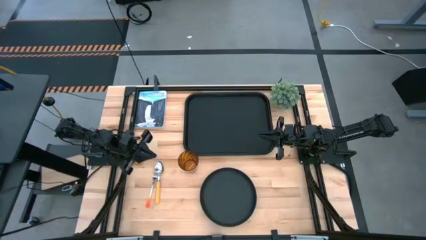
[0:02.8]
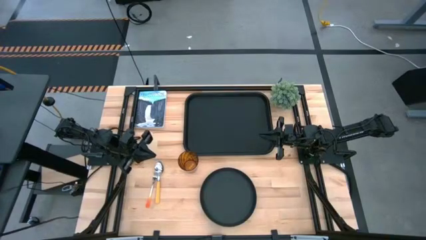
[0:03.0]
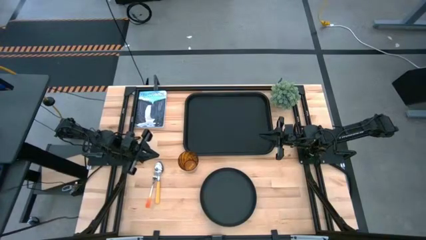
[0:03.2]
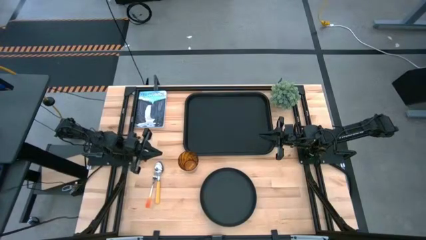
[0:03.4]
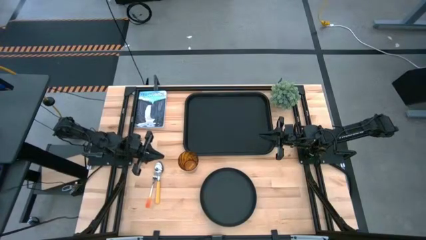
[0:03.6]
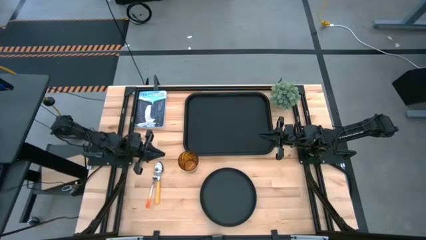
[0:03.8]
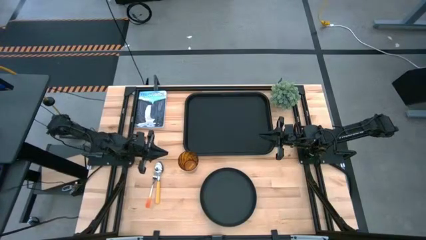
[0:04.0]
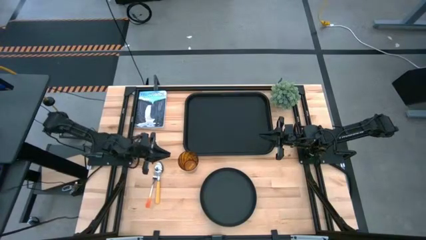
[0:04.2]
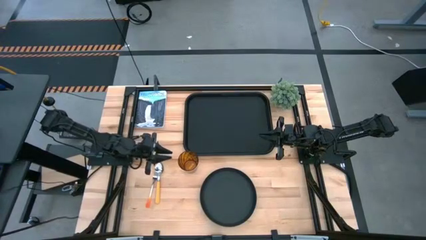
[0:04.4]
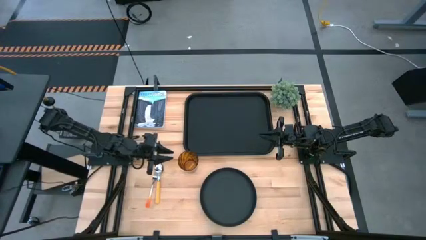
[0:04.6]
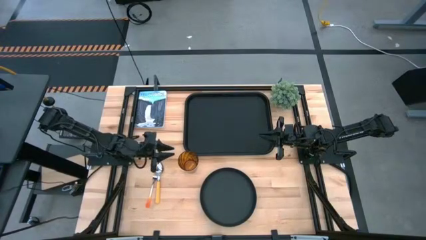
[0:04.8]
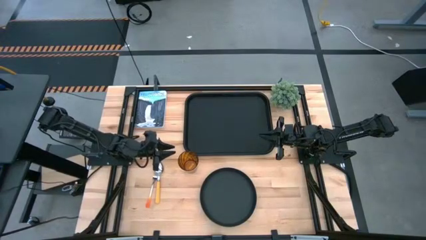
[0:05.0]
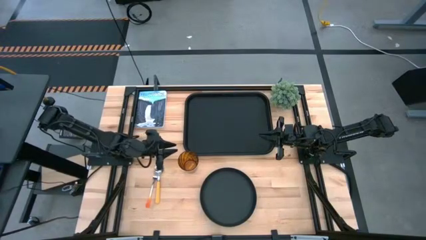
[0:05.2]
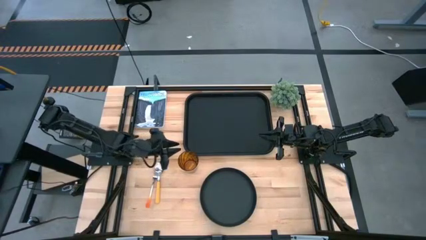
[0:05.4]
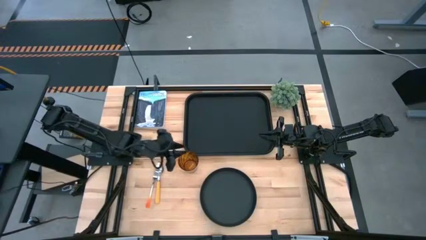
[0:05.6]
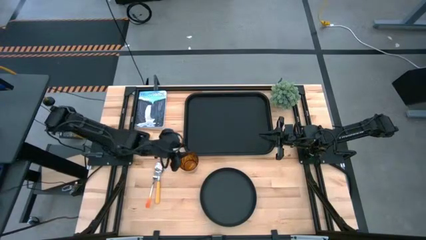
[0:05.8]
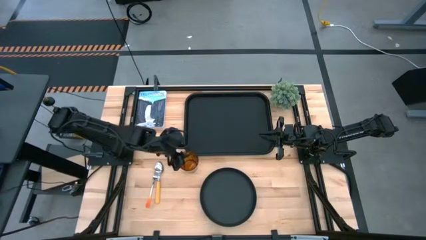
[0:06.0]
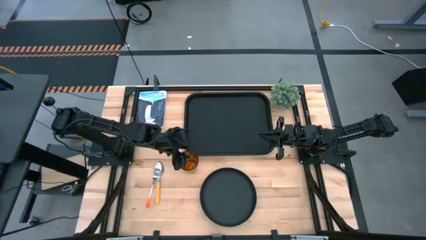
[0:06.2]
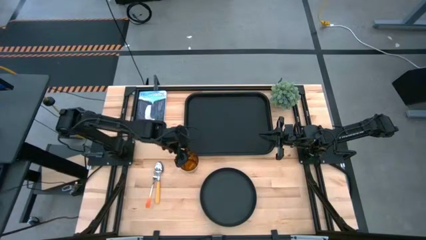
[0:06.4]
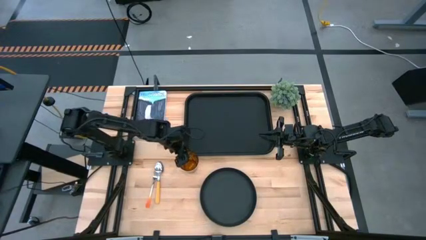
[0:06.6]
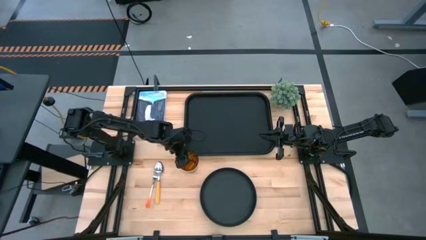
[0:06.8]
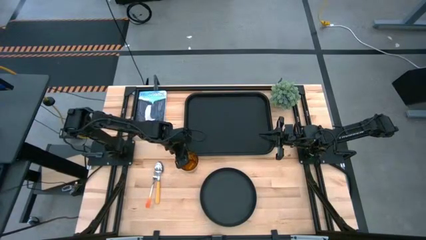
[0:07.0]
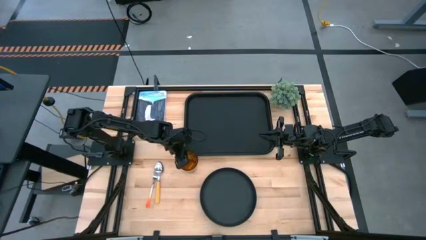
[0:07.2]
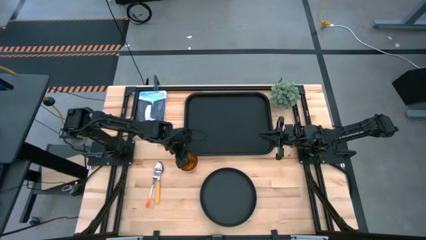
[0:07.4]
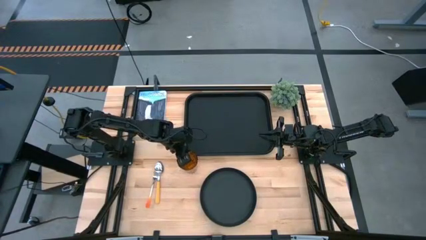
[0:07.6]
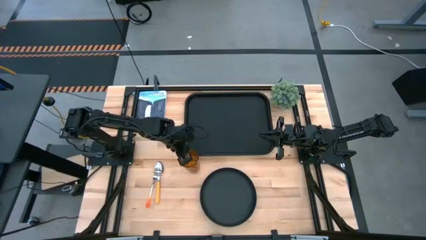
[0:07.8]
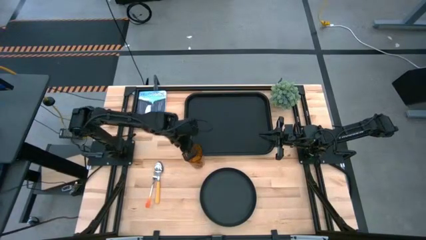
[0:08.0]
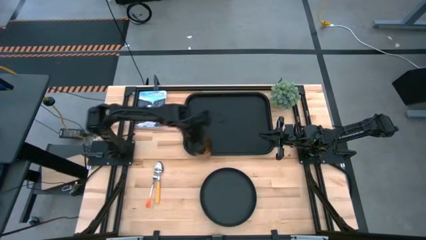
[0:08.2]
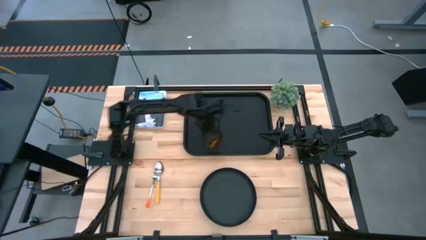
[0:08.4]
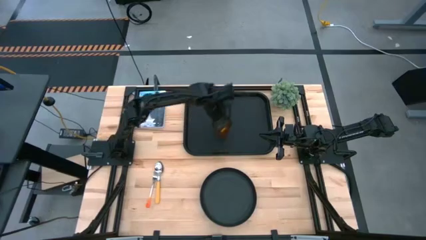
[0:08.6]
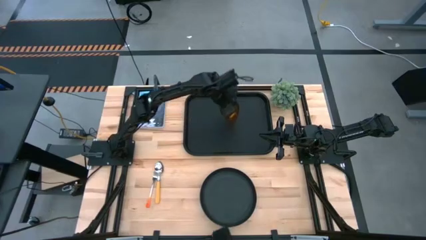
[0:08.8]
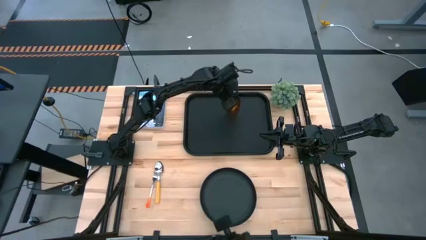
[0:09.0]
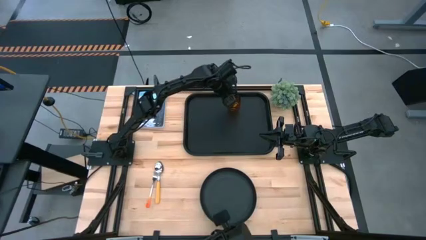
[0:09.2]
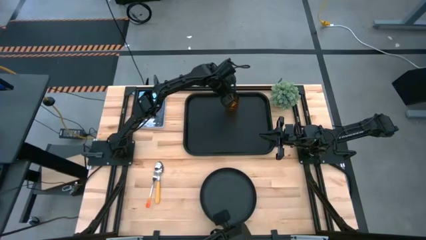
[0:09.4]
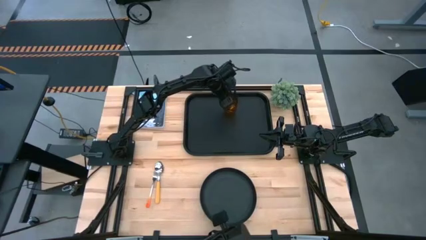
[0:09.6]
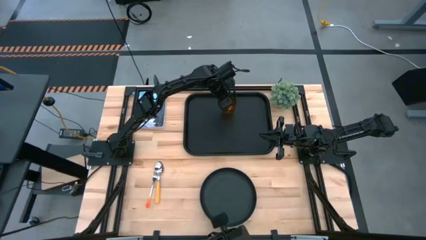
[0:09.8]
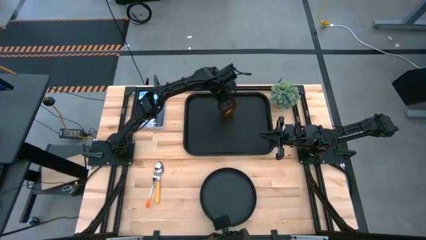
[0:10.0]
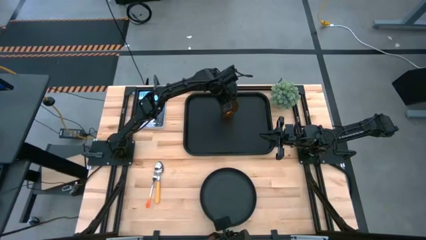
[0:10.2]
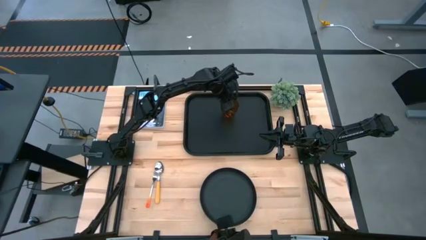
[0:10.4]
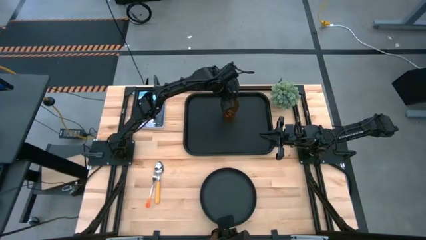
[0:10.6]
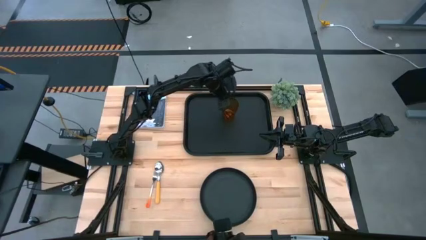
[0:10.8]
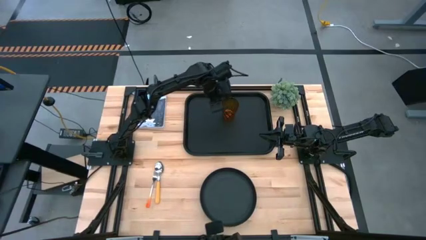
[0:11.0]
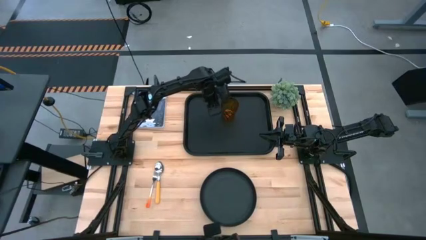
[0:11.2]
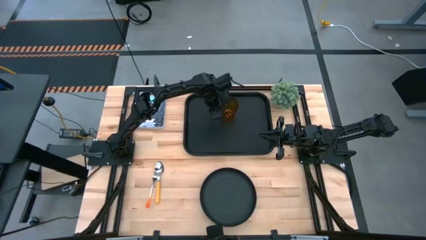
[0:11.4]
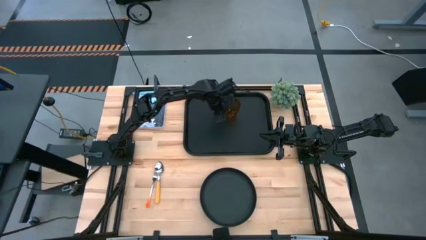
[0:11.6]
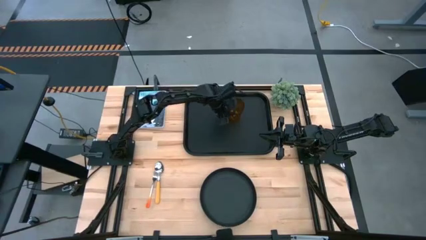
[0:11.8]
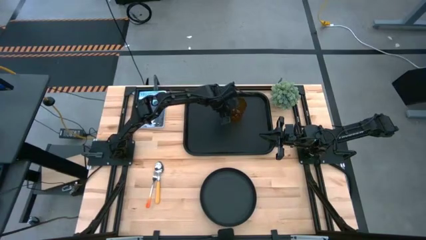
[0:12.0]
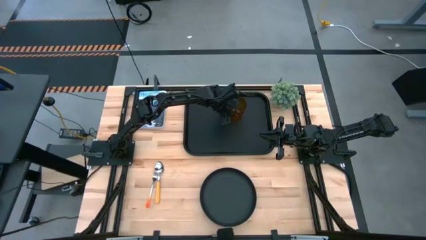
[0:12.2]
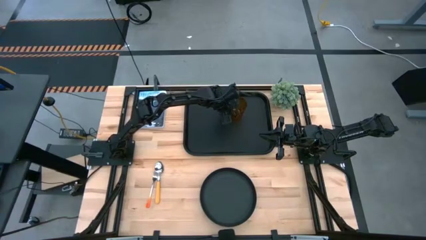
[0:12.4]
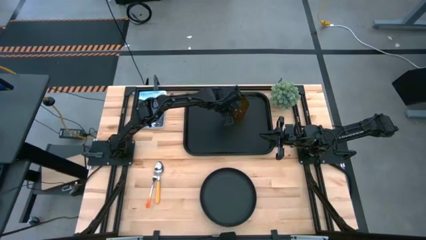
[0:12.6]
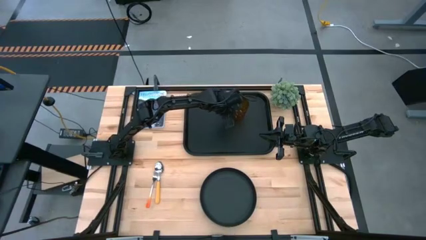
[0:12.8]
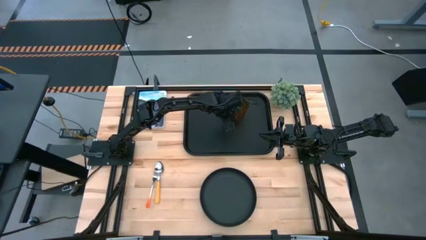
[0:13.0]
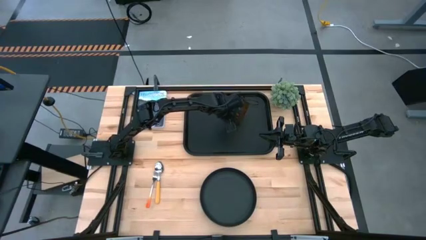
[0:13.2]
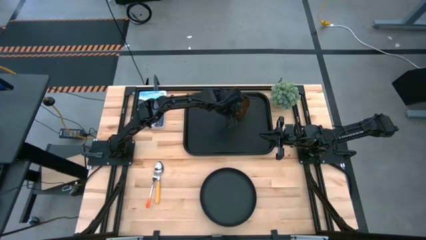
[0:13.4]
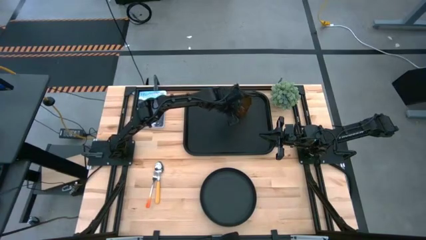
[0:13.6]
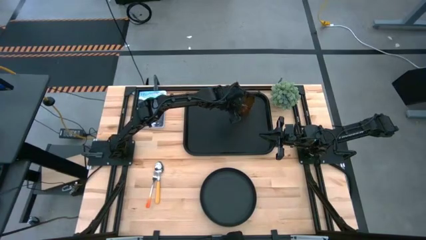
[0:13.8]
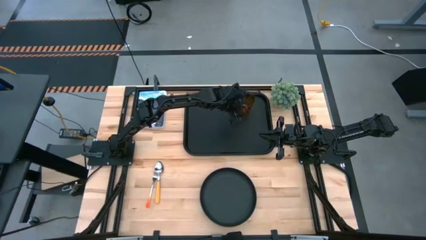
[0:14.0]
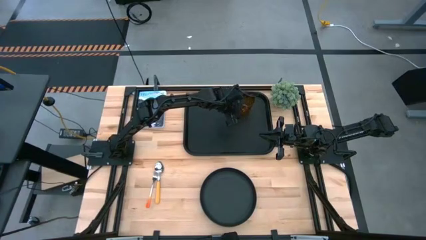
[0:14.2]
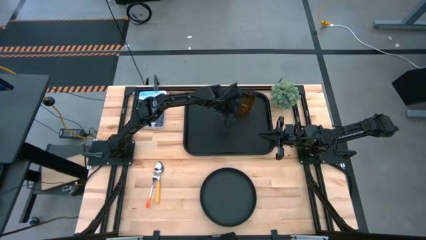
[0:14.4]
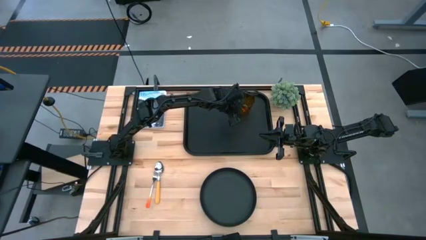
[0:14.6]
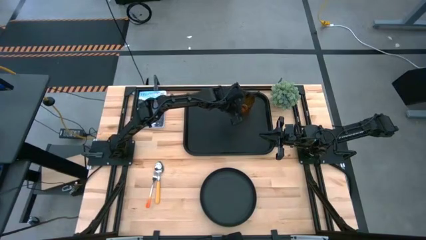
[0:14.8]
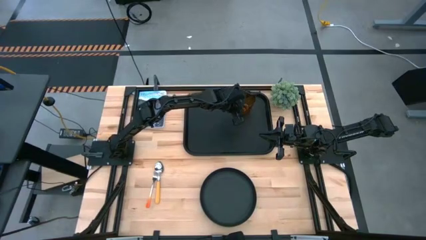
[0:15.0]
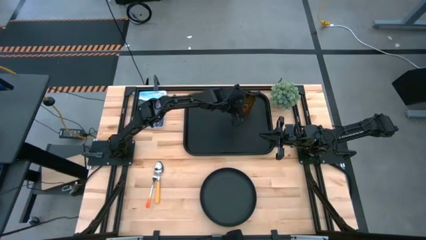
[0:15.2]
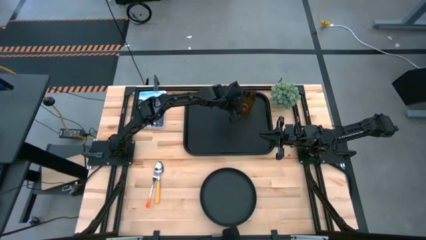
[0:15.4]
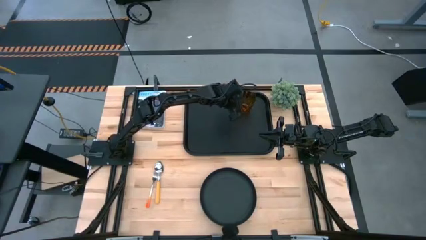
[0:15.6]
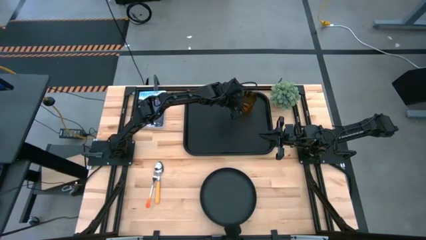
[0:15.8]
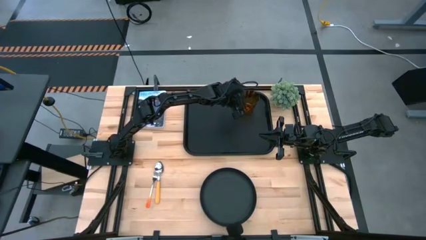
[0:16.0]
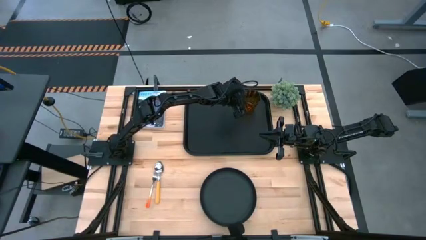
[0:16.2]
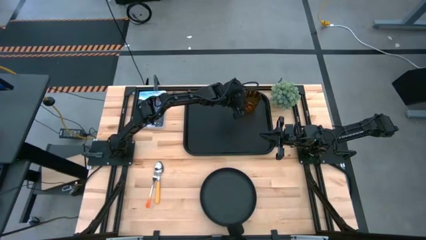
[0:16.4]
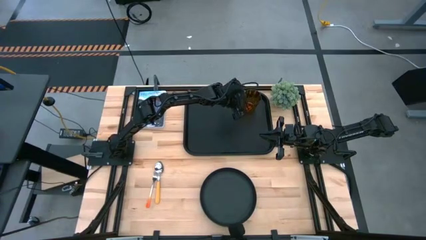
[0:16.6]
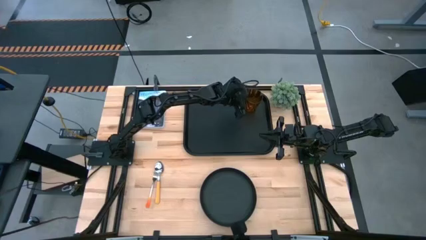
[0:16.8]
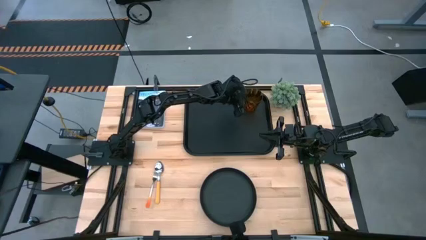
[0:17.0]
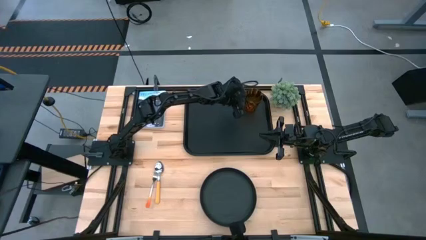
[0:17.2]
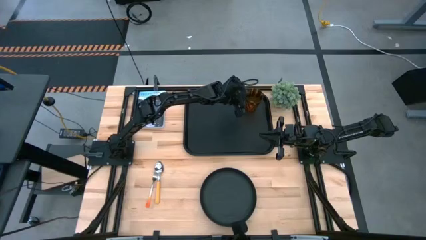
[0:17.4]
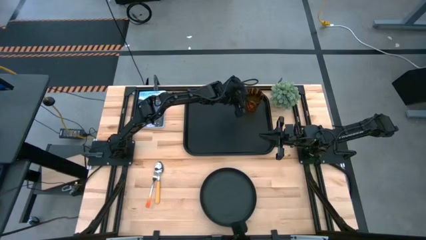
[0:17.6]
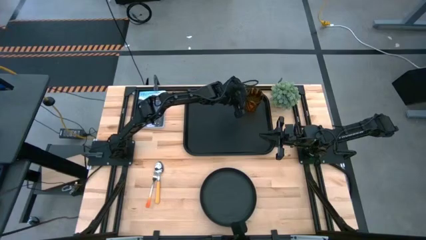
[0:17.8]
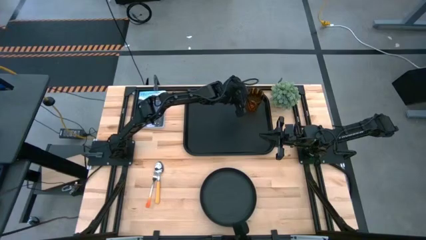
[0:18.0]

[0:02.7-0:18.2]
Task: Pick and place plate/cup/fork/spoon on tray
Put the brown cup on the black tray
